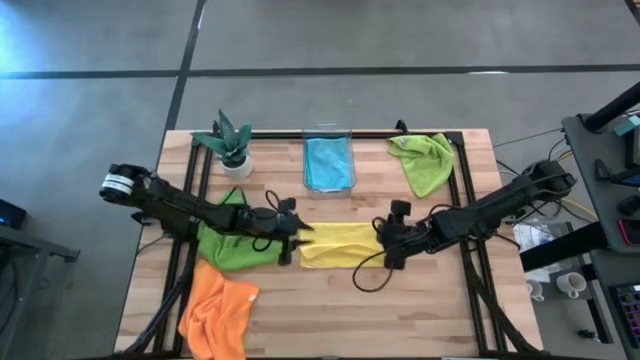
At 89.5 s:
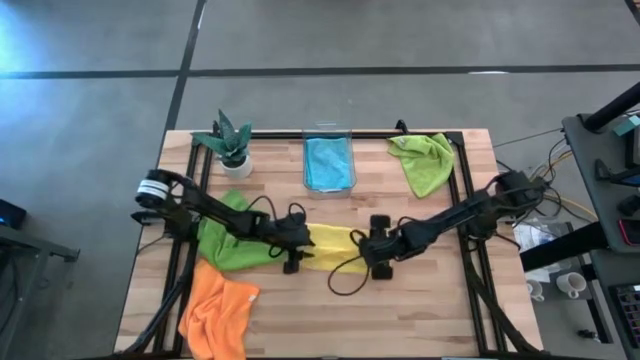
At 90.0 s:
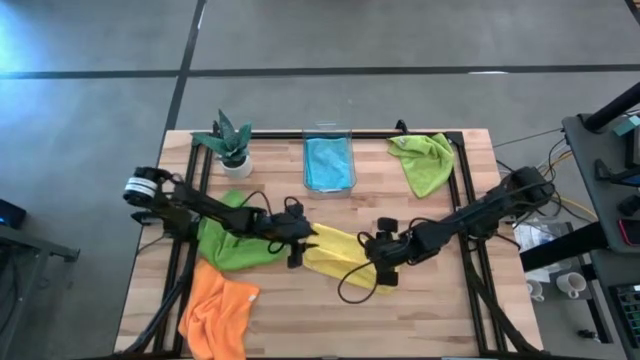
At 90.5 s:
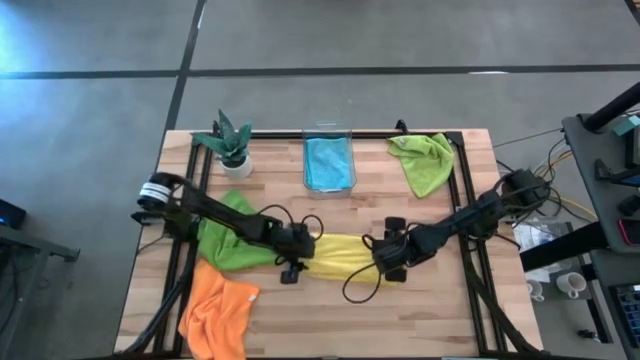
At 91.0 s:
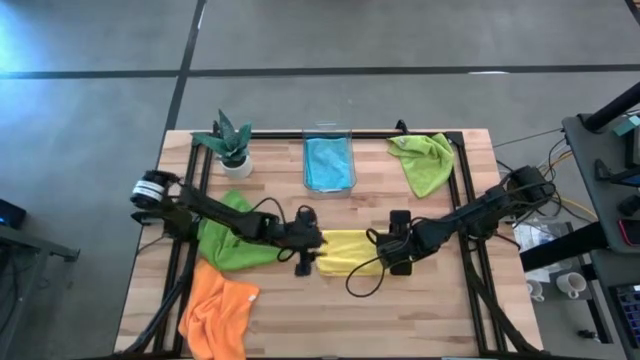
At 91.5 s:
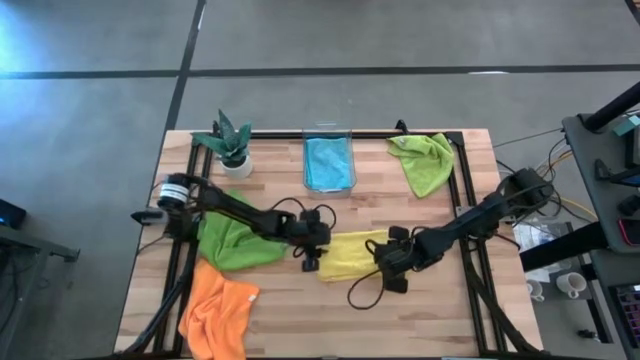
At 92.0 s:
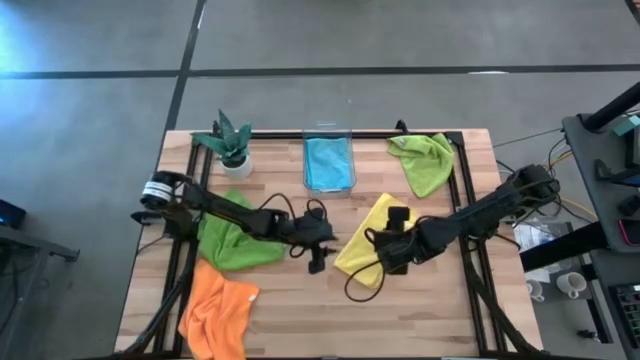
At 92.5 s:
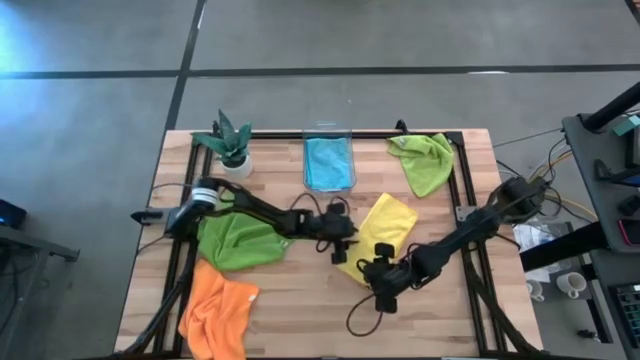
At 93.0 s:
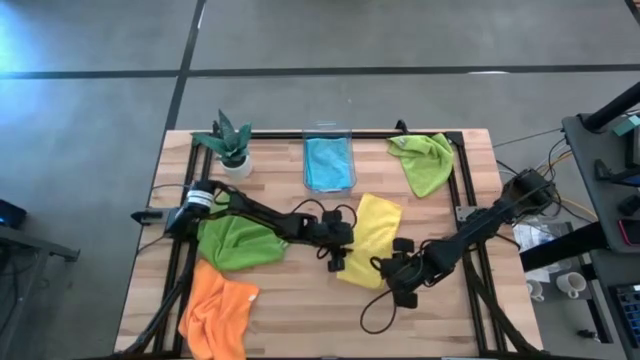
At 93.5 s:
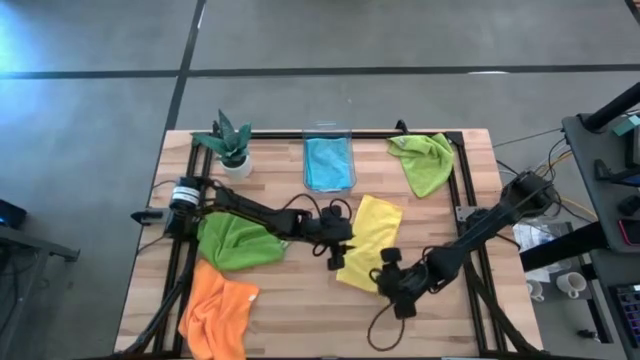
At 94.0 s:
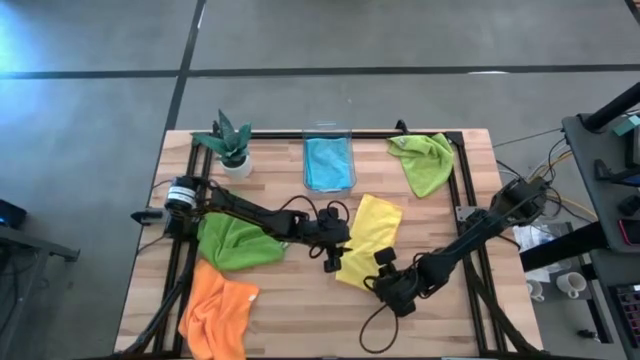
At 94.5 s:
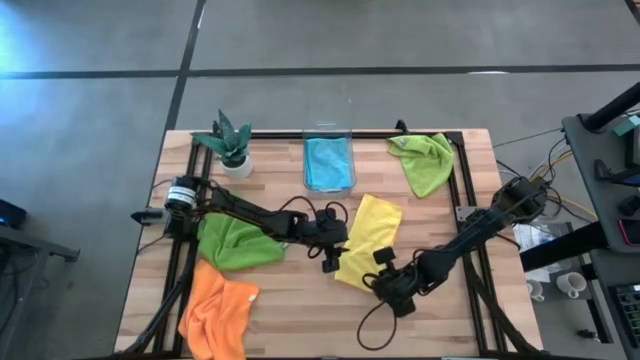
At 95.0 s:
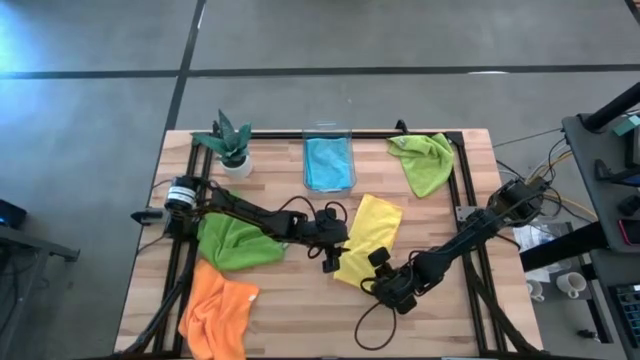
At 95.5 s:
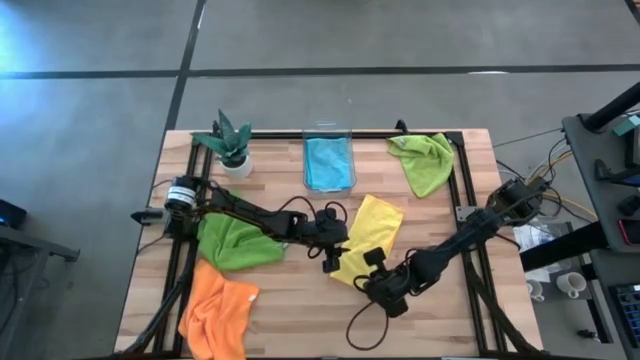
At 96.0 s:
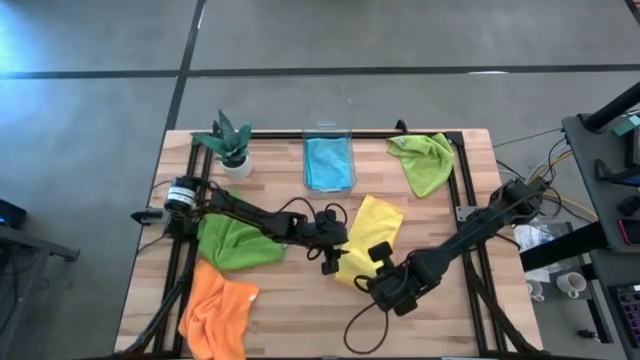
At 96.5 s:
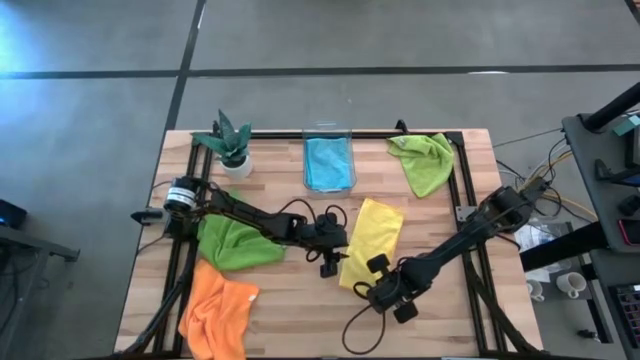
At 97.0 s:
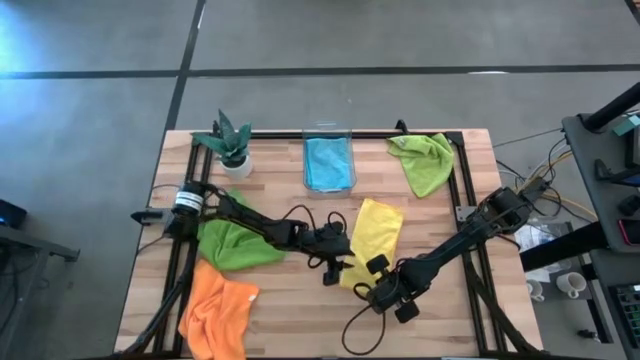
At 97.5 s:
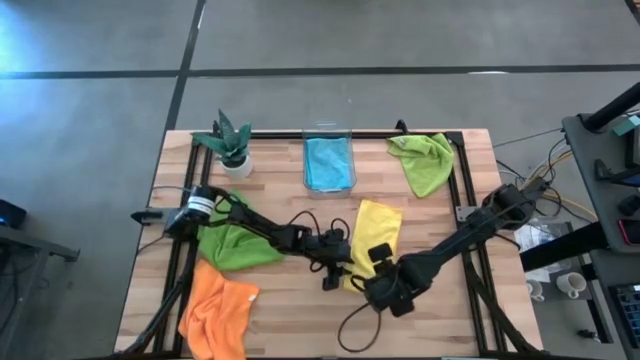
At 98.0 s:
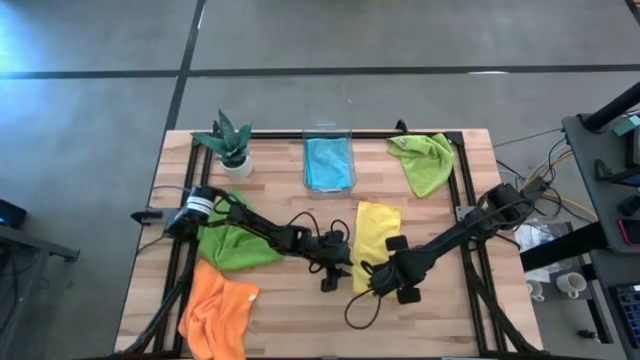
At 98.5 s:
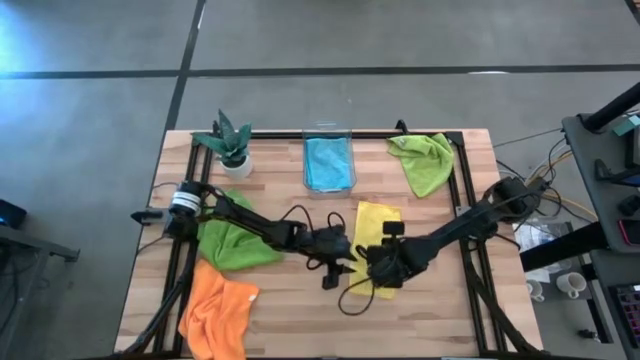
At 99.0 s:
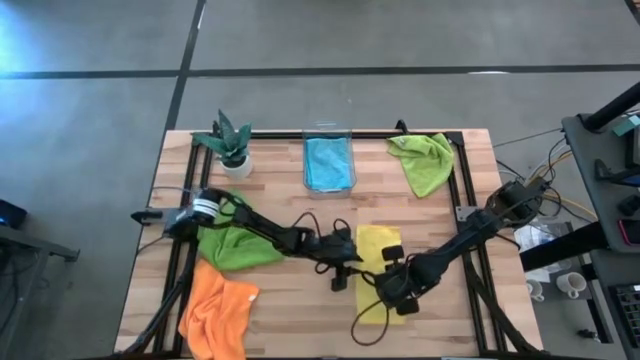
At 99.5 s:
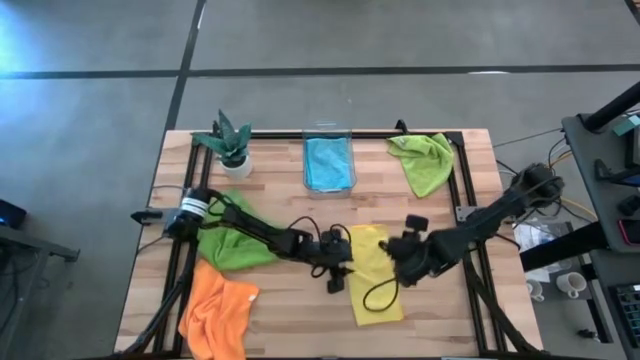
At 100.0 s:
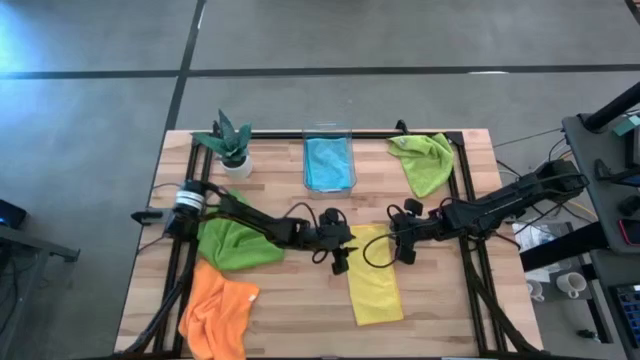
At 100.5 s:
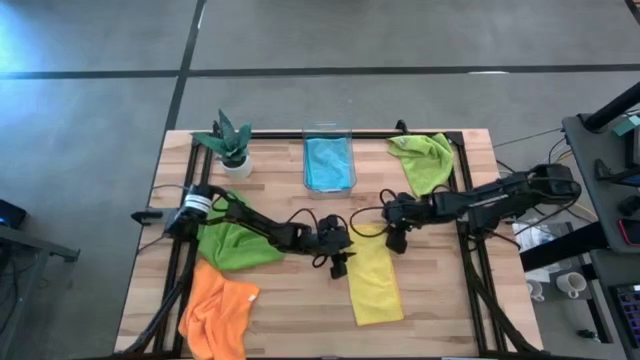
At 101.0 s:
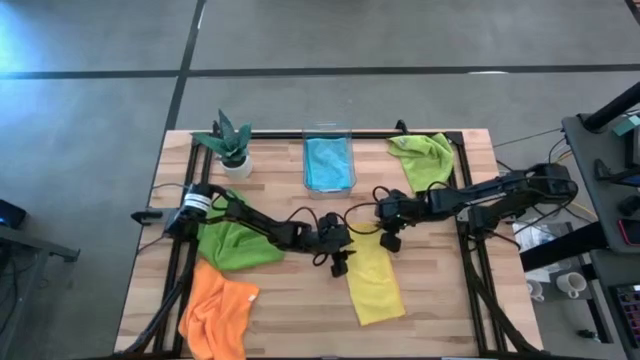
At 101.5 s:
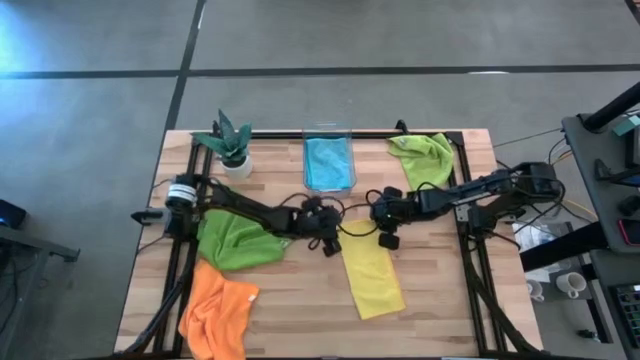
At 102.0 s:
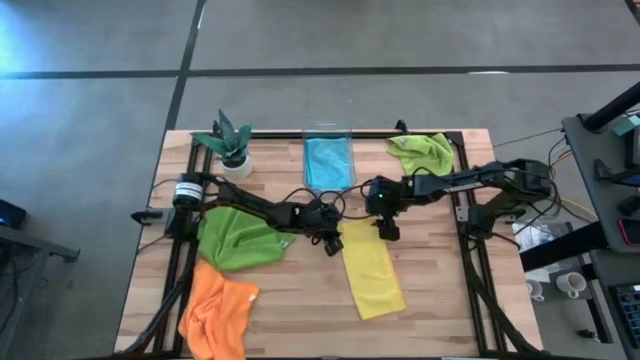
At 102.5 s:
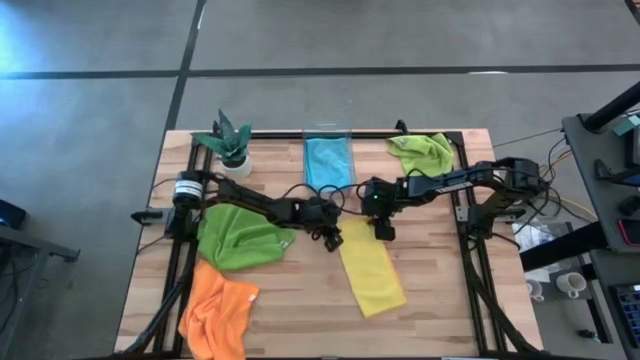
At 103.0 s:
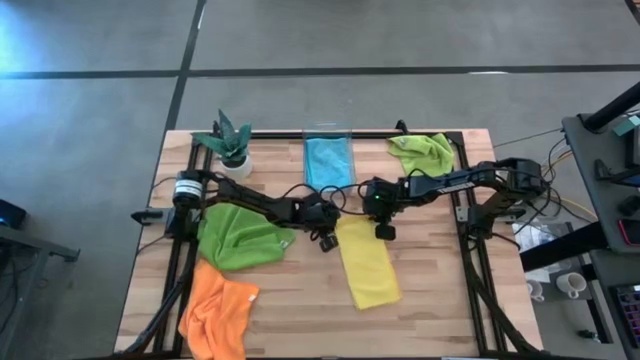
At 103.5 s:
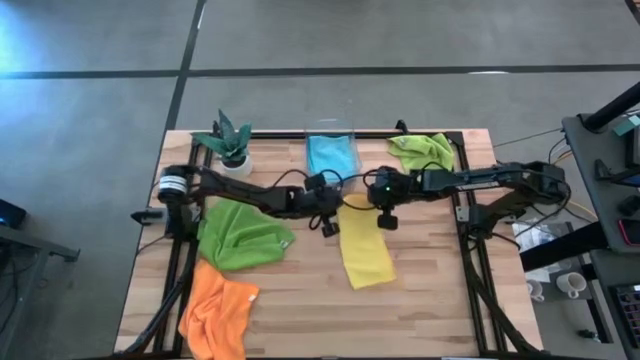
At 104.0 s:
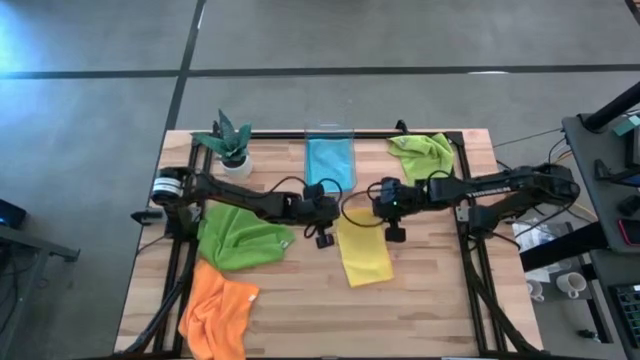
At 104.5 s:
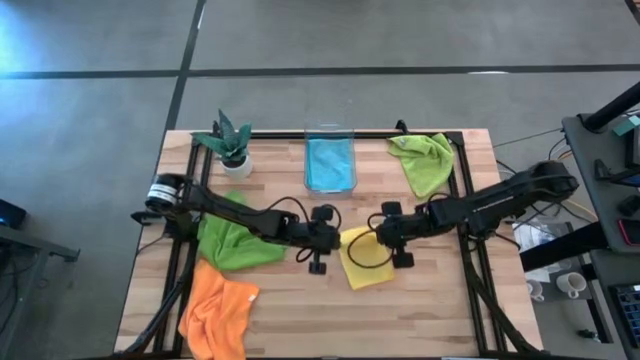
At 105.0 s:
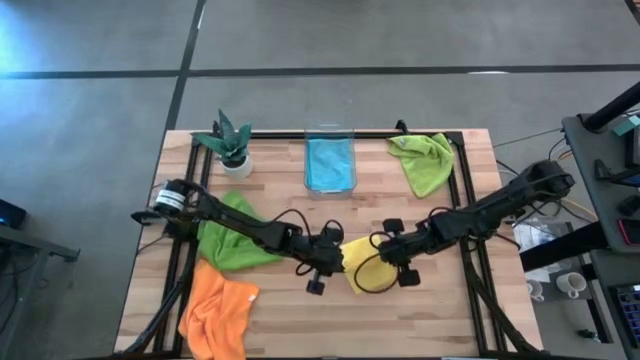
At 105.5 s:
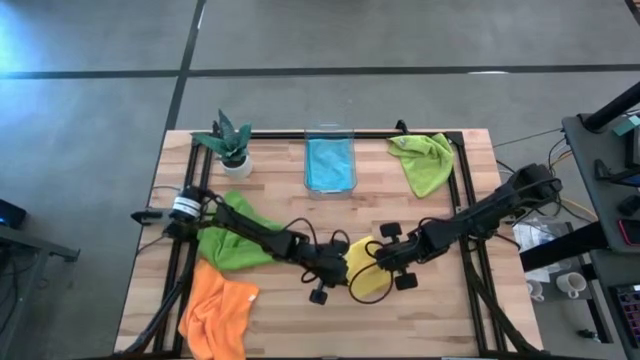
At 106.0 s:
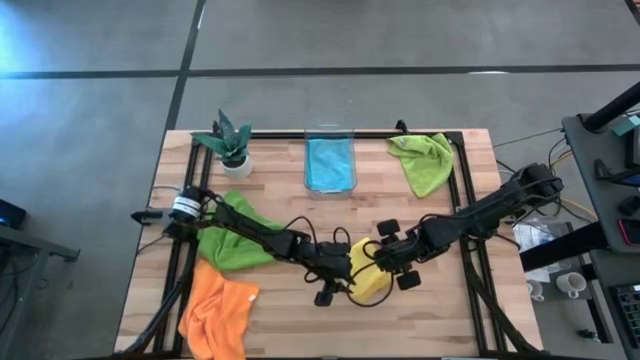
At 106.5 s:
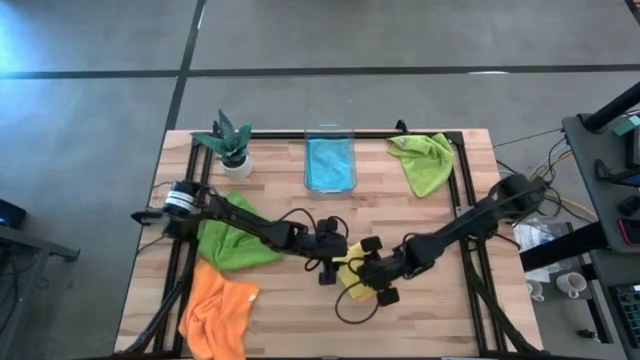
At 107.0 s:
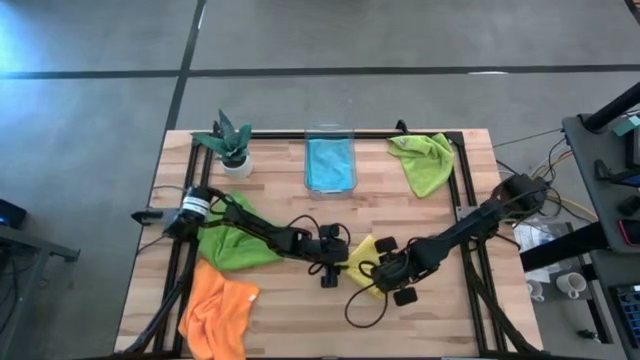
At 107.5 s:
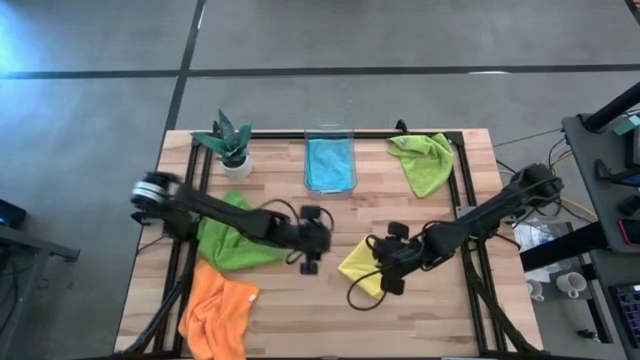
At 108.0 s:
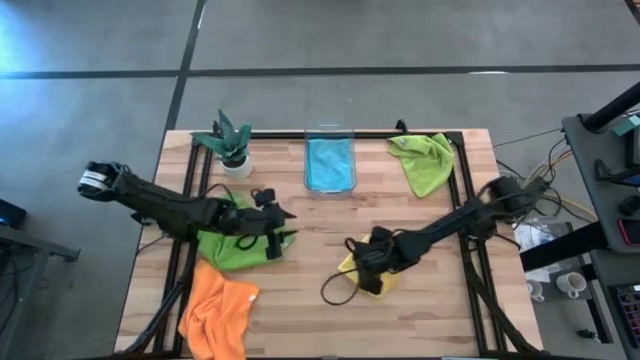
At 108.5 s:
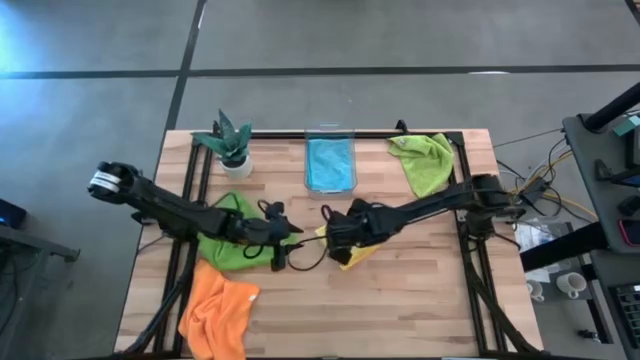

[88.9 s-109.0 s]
Task: Fold microfiber towels
Fold the yellow microfiber cloth
